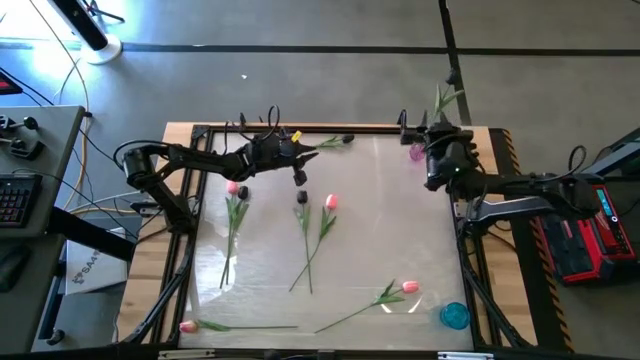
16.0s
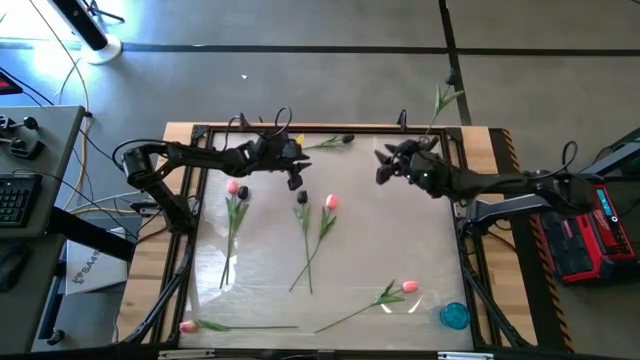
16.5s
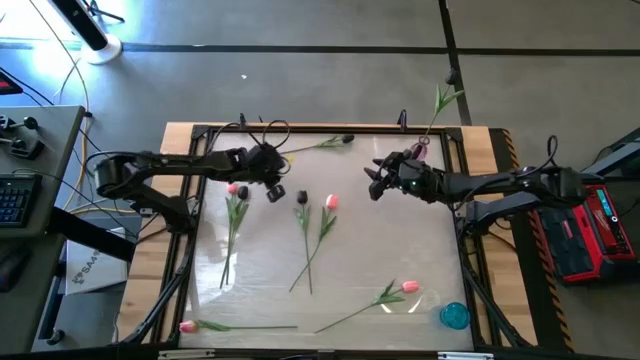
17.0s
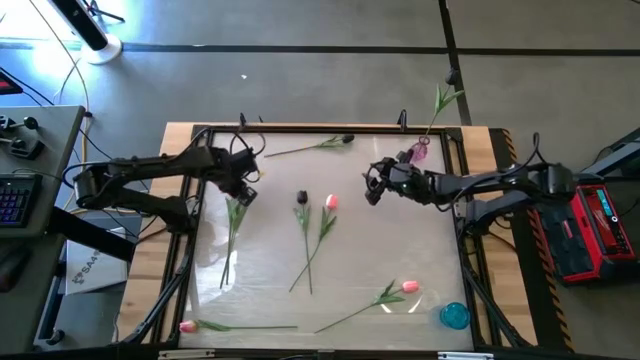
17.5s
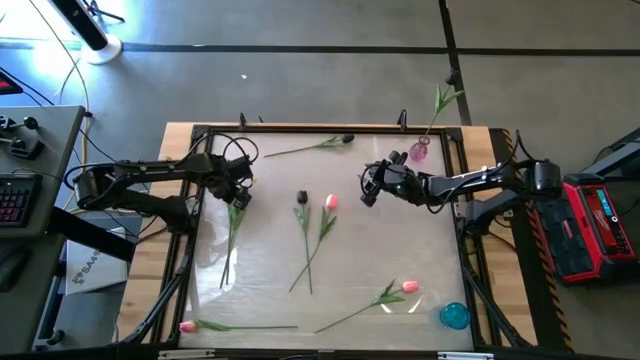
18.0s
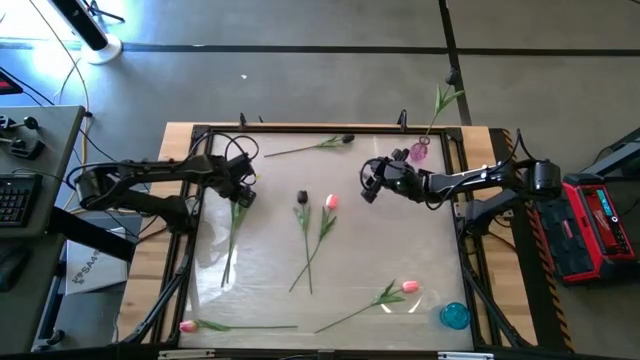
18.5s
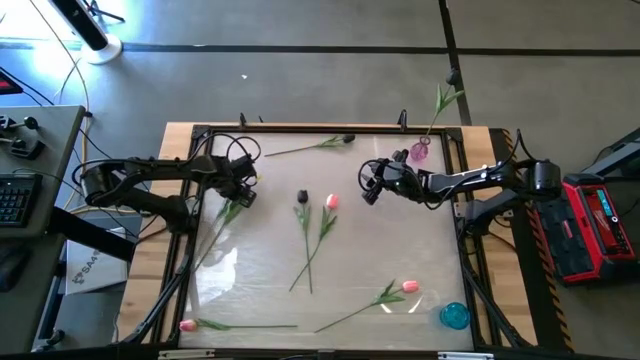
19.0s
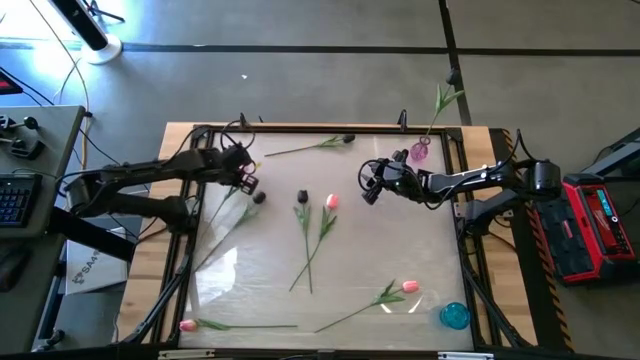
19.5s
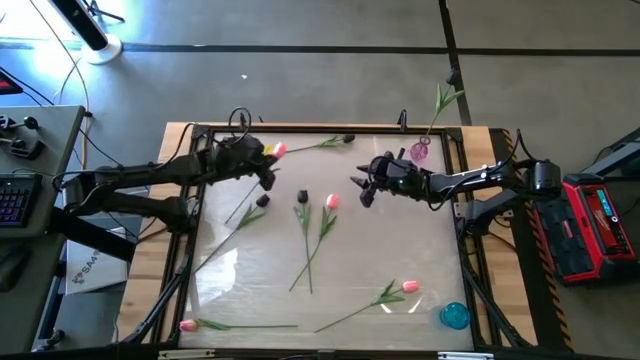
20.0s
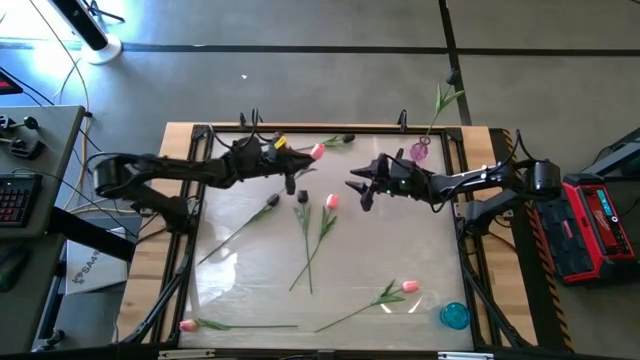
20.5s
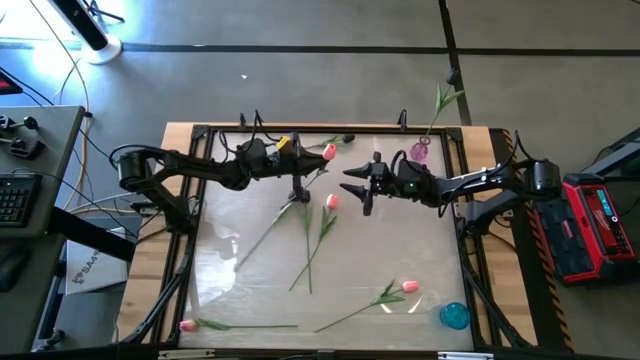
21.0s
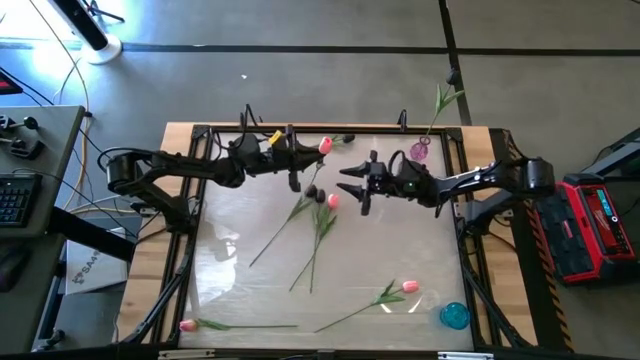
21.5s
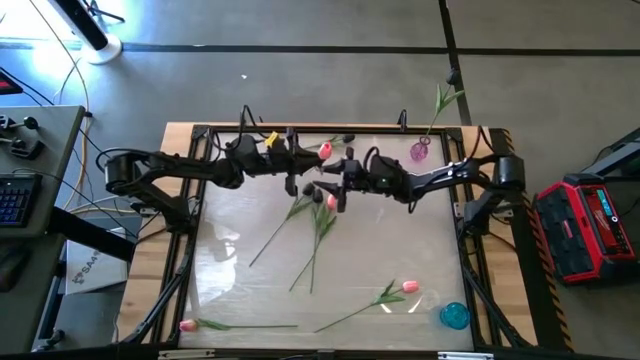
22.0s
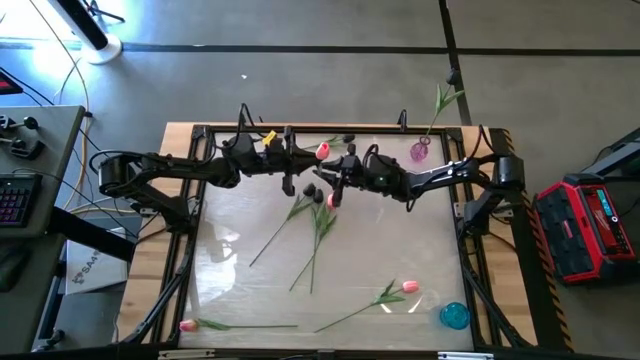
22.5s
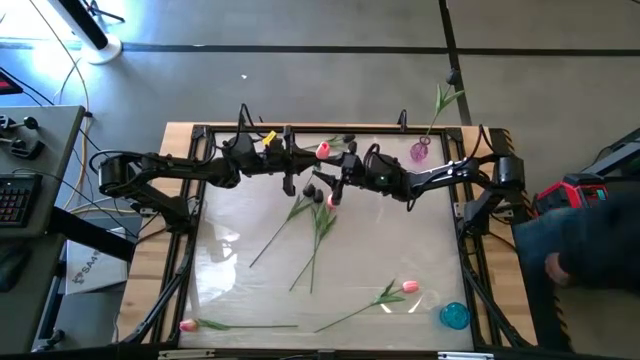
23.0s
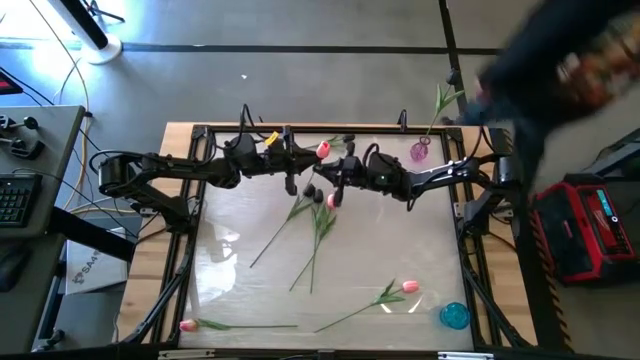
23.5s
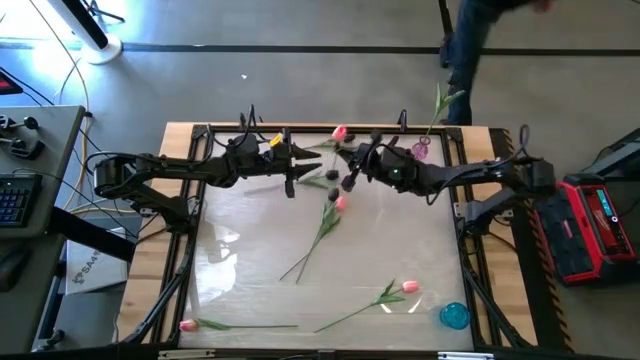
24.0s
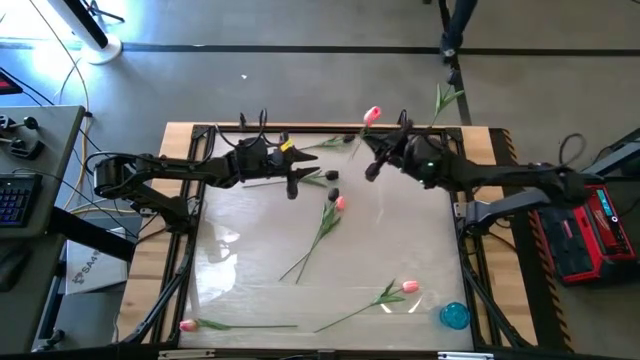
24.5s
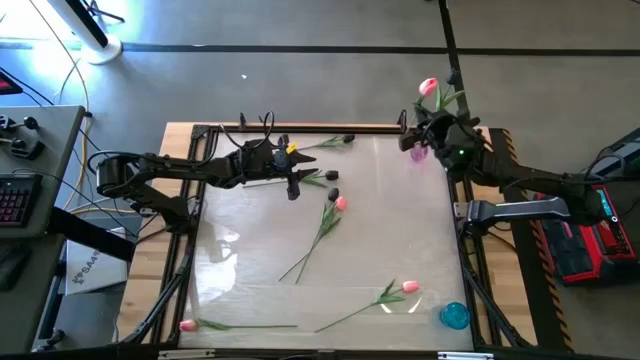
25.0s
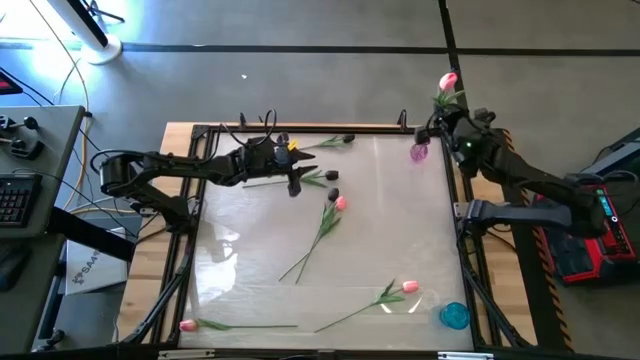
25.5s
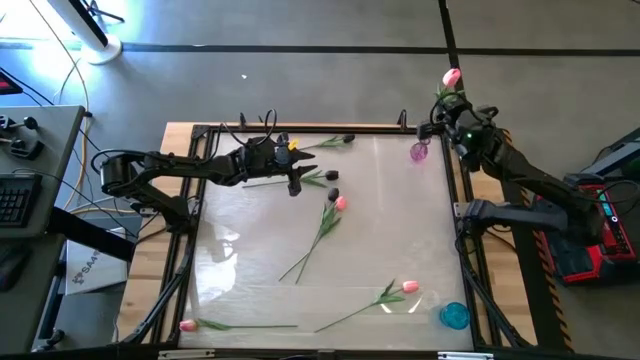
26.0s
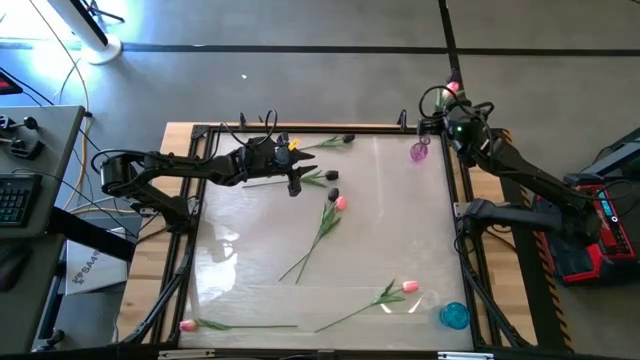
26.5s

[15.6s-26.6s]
Task: Sort flowers into vase by color
Put the middle left pink flower into the purple vase

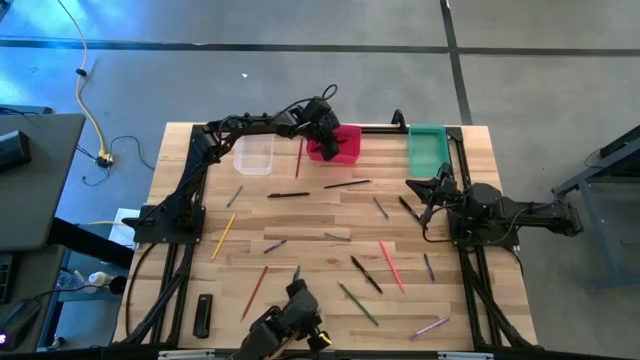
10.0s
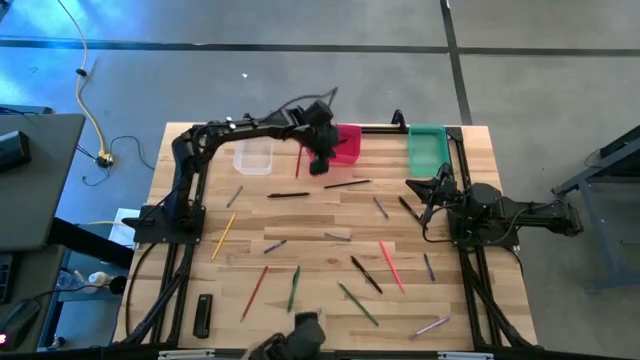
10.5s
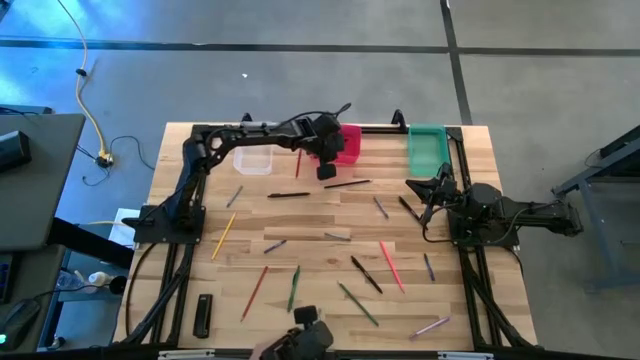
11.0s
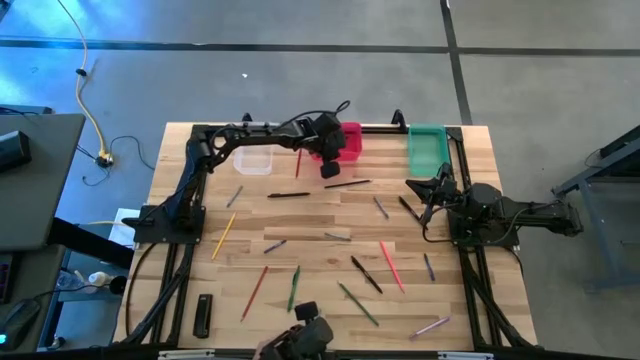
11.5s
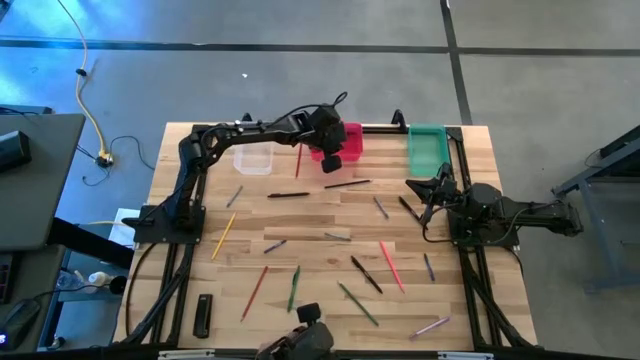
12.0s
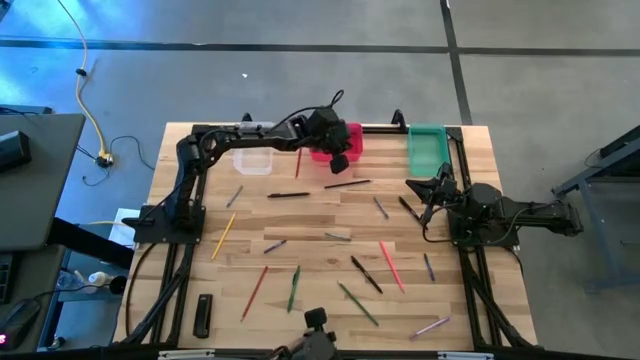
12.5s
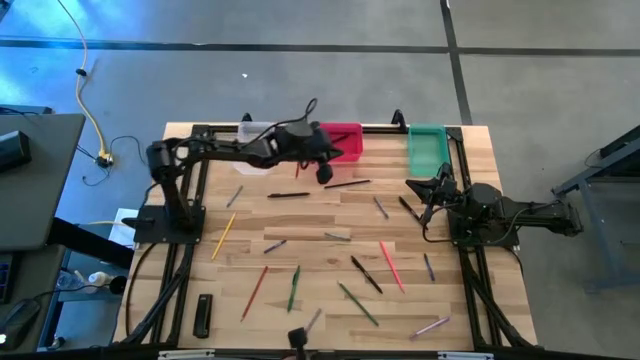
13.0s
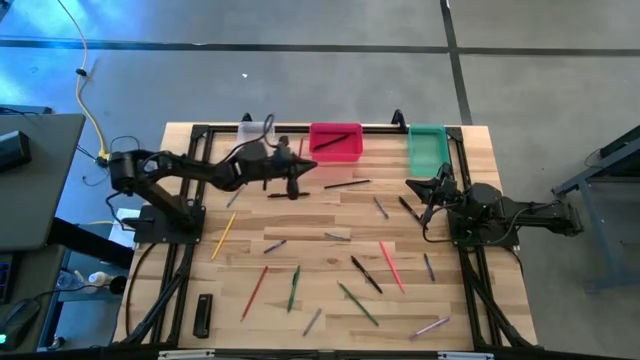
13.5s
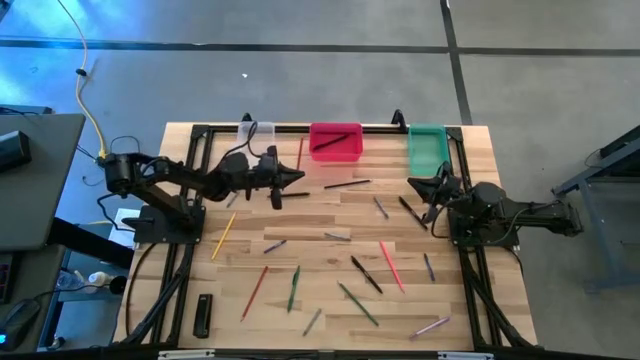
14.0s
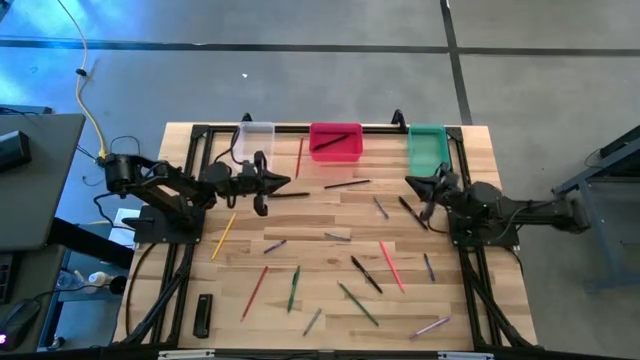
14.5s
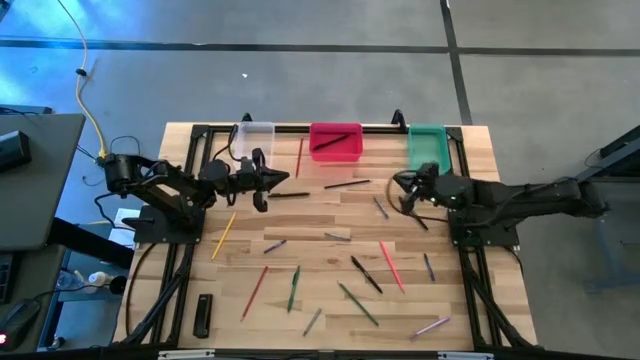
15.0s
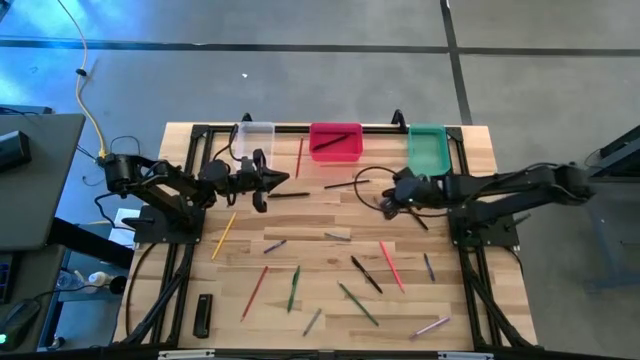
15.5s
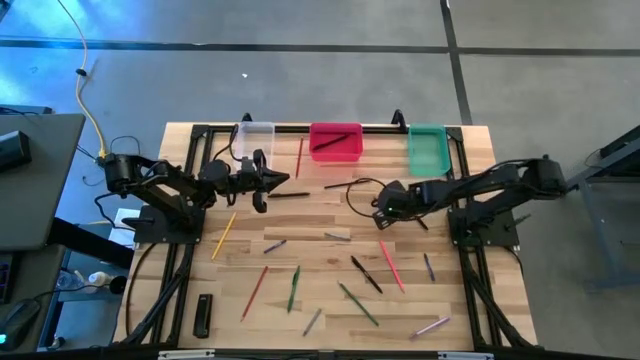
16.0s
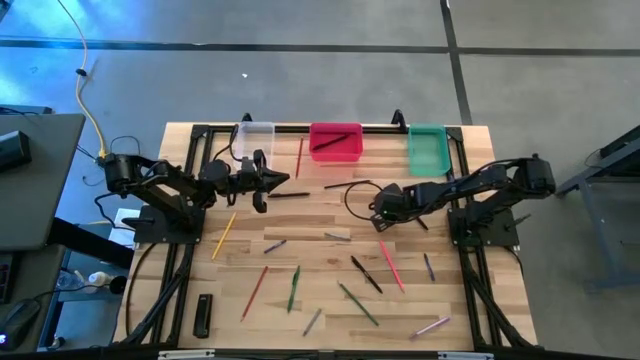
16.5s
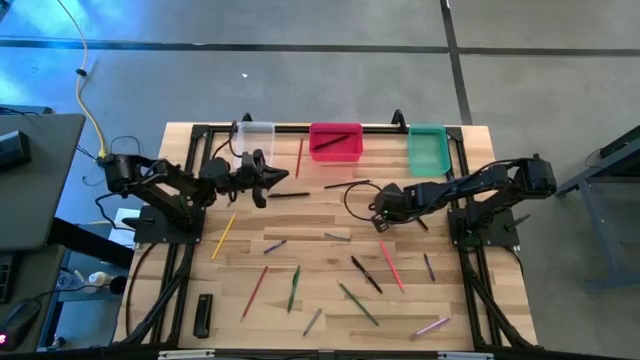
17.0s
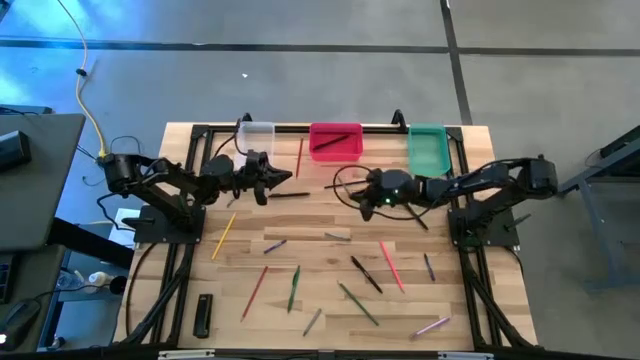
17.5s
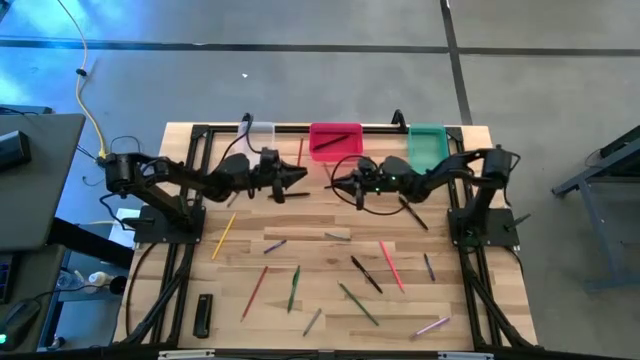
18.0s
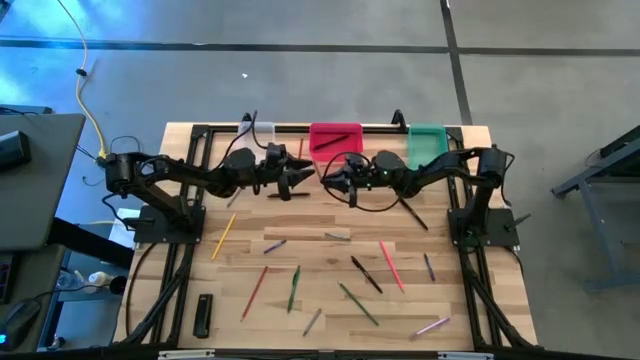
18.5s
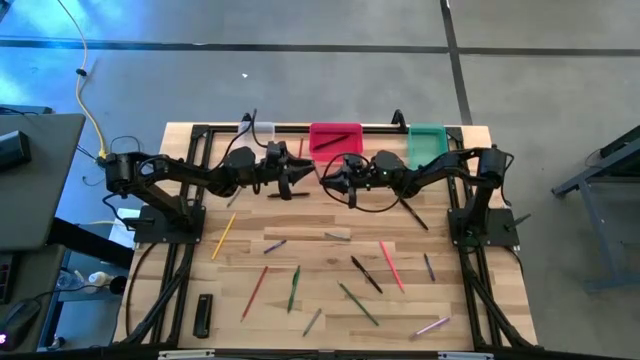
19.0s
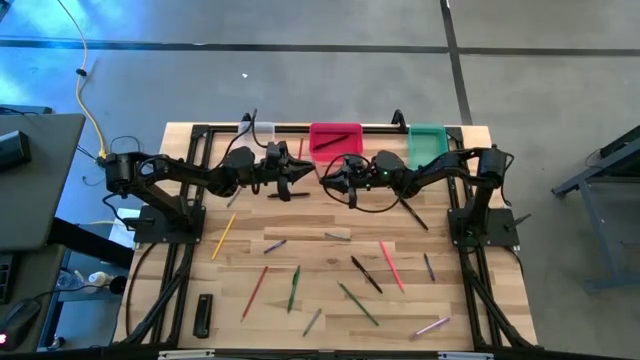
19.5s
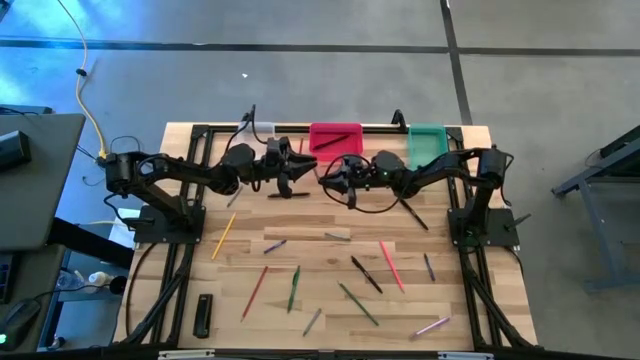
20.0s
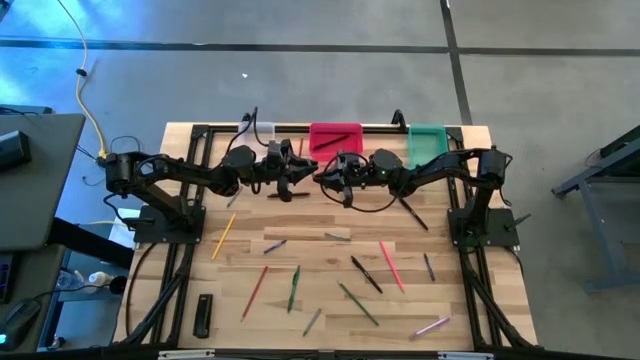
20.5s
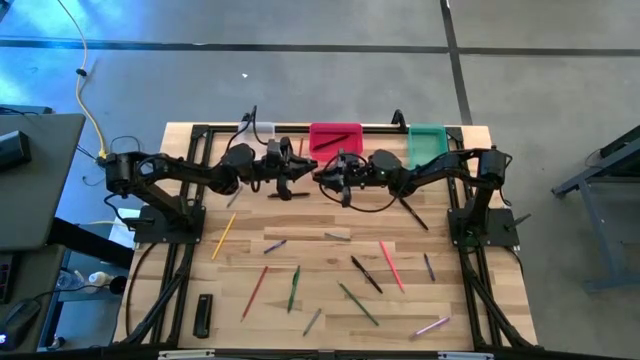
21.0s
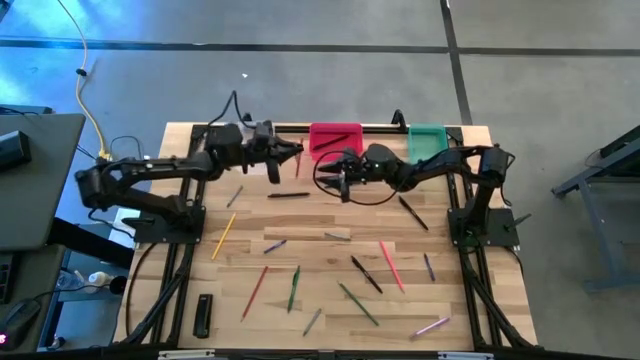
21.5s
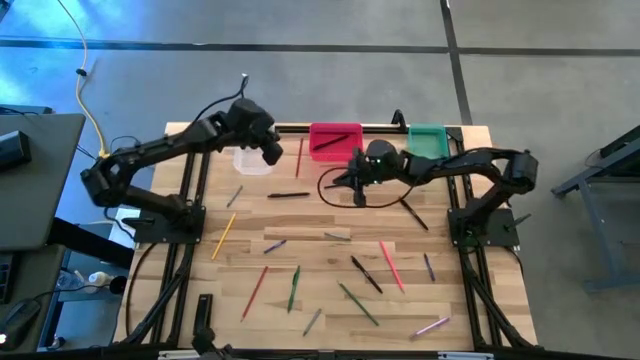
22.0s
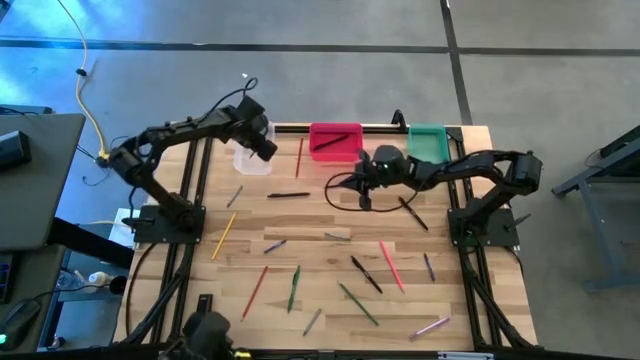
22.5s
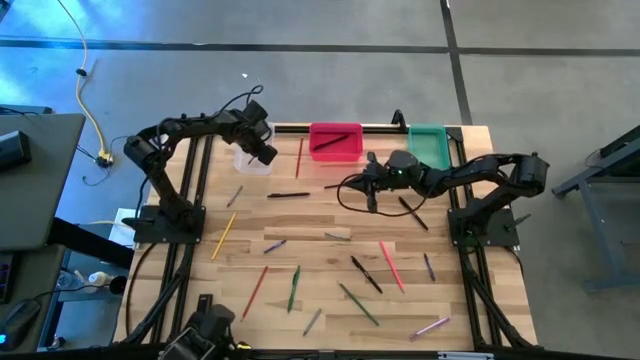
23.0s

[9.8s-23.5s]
Task: Sort crayons/erasers/pens/pencils in bins
Put the gray crayon into the transparent bin
